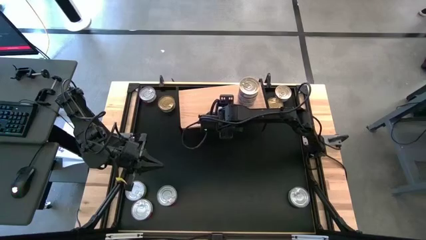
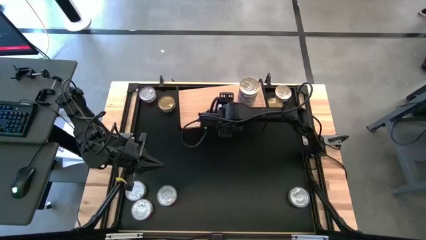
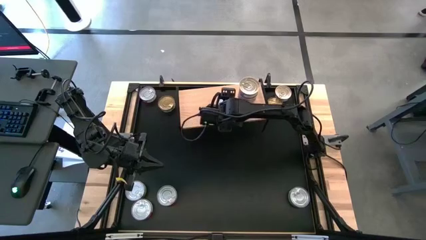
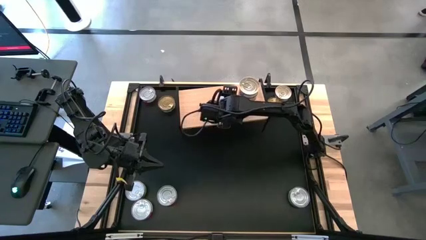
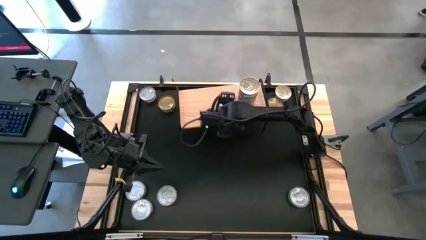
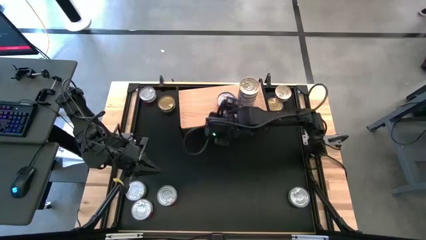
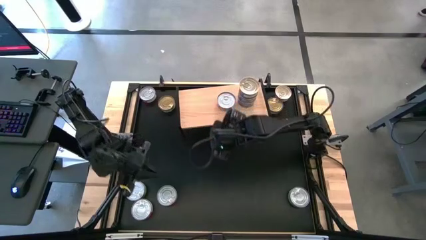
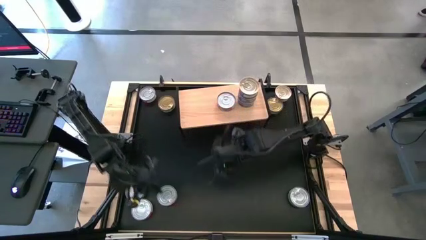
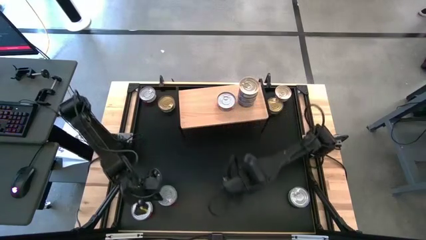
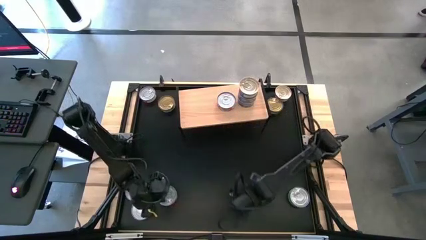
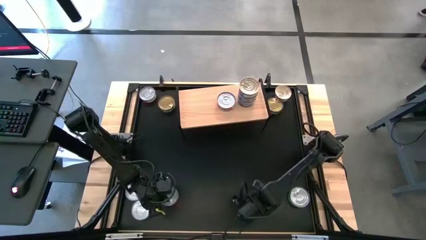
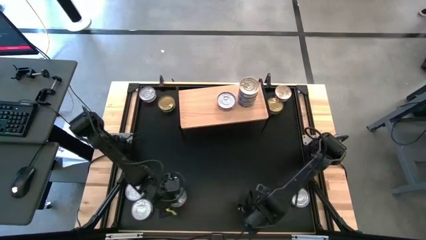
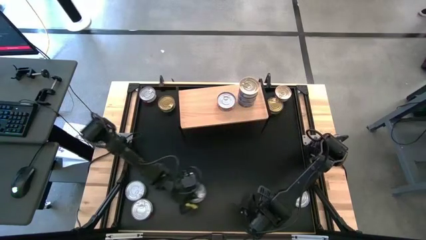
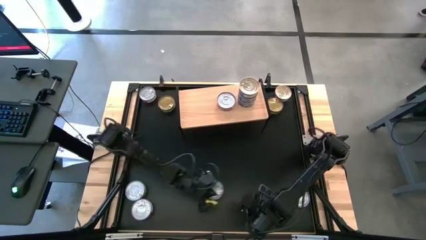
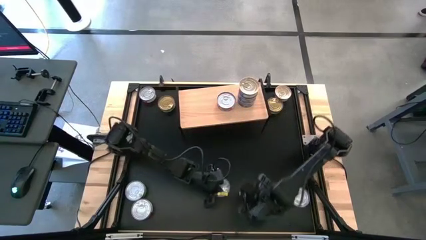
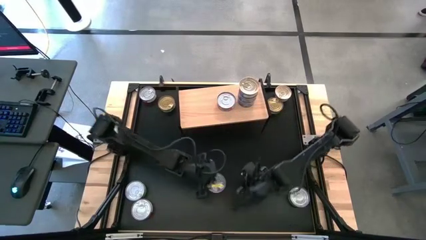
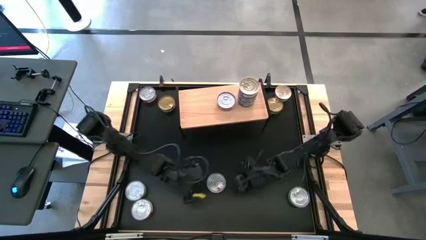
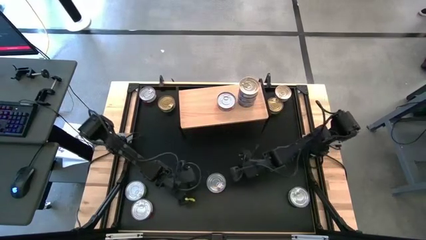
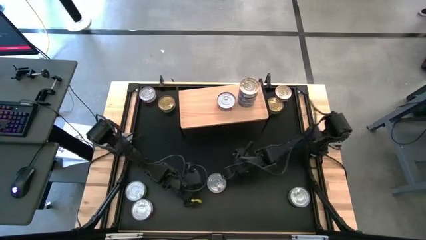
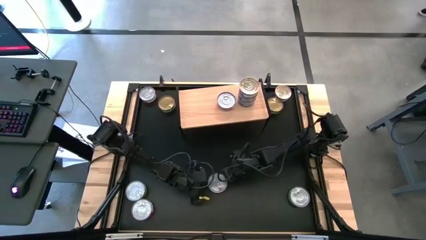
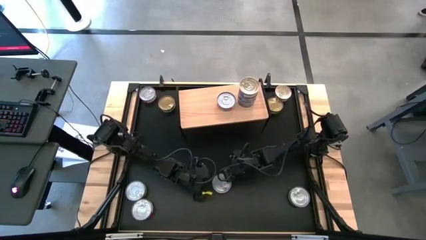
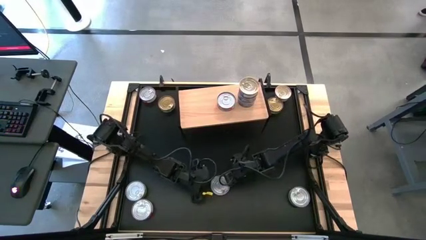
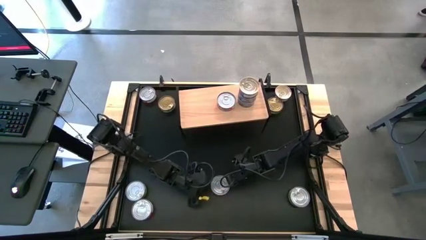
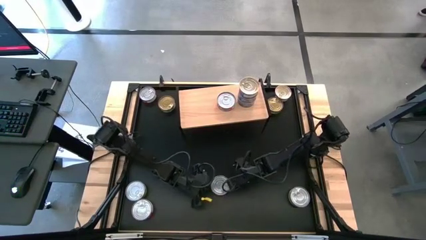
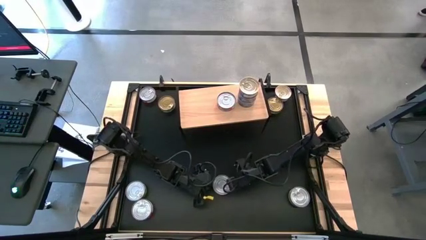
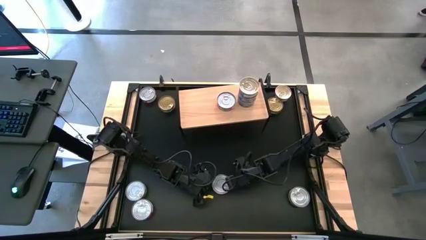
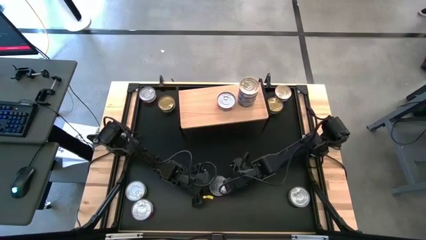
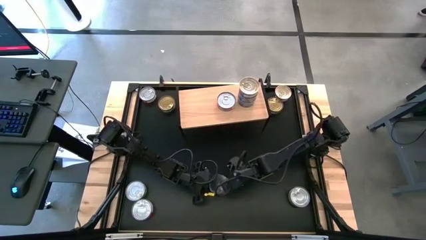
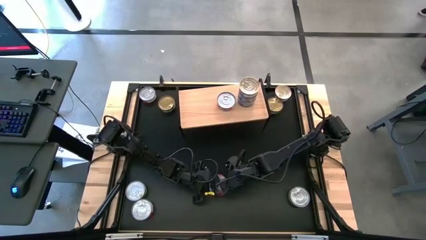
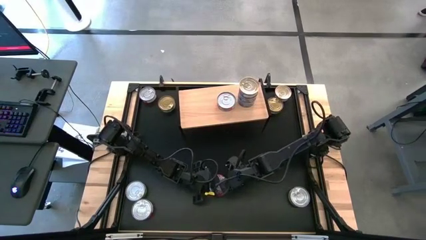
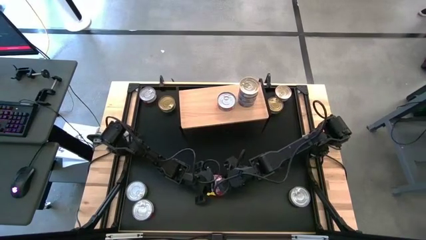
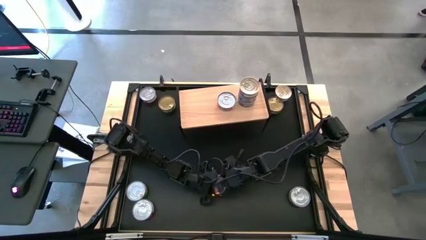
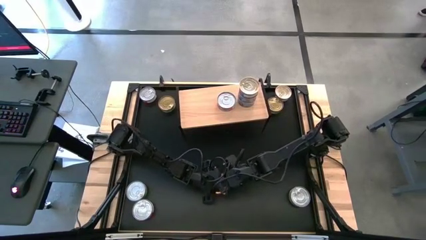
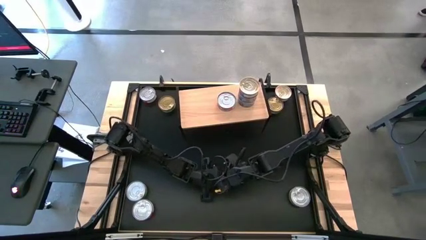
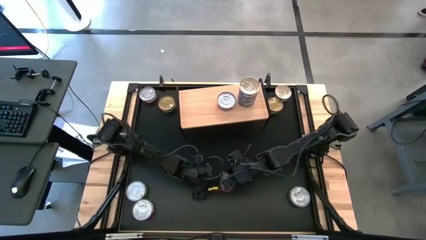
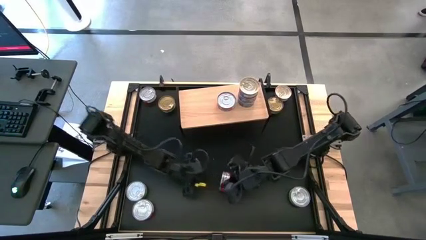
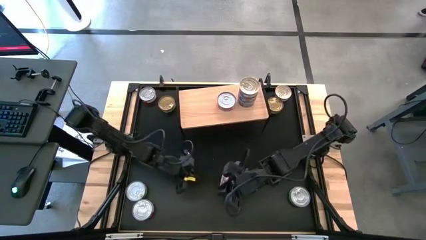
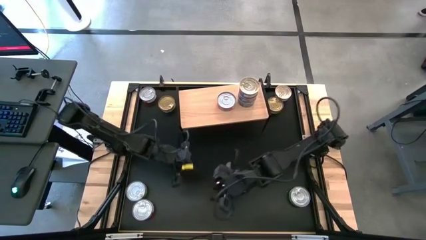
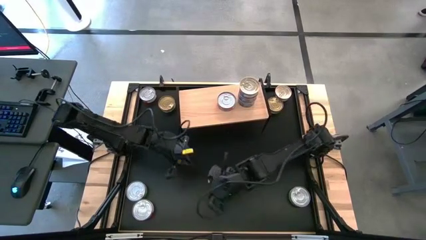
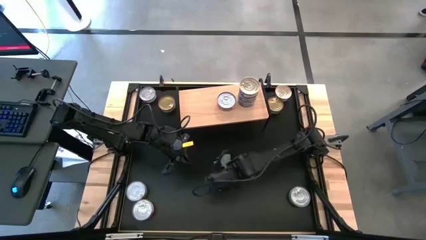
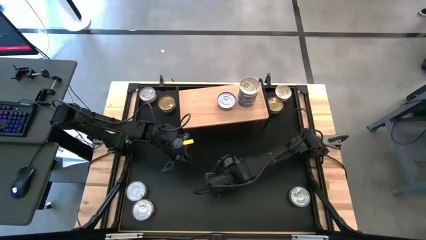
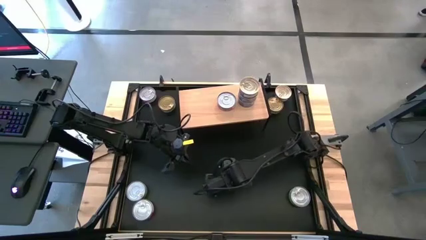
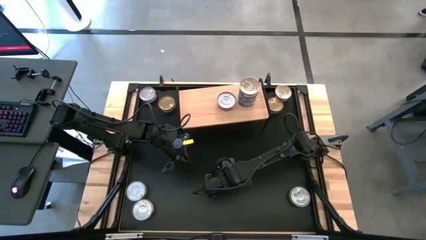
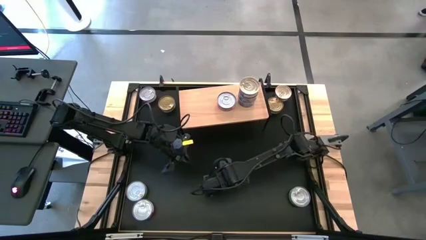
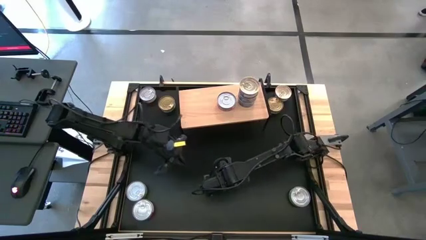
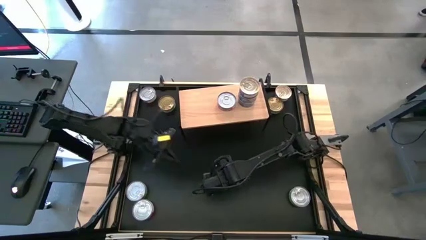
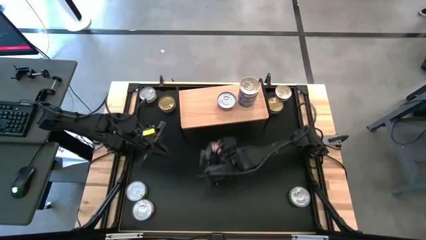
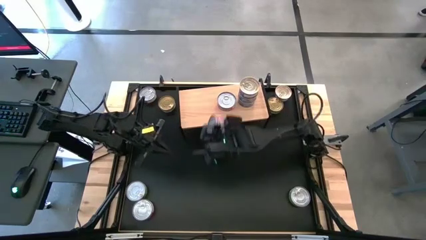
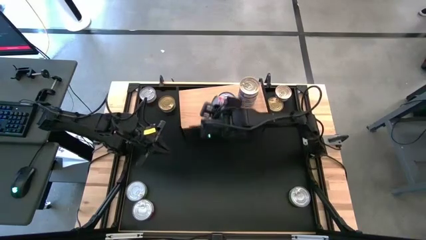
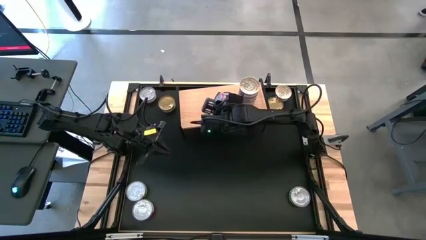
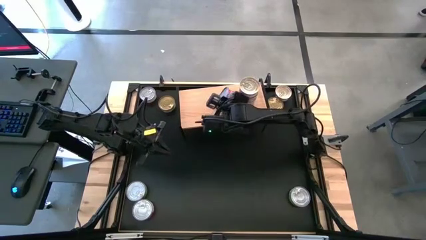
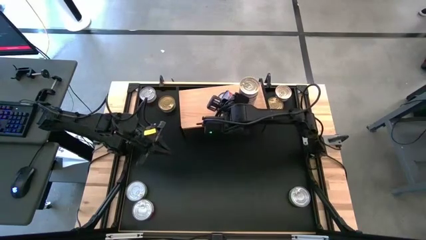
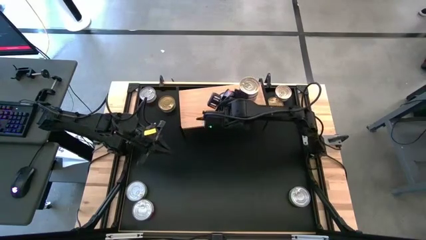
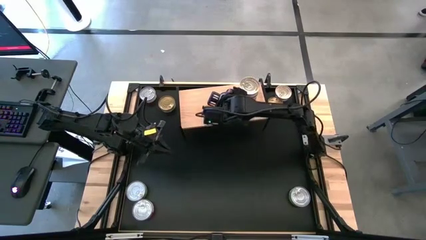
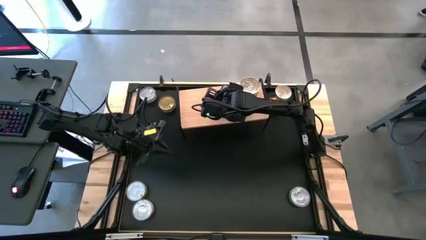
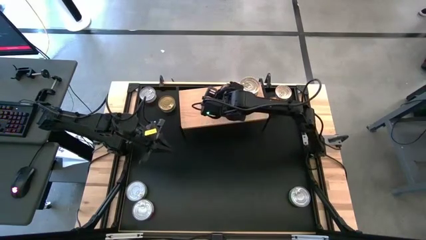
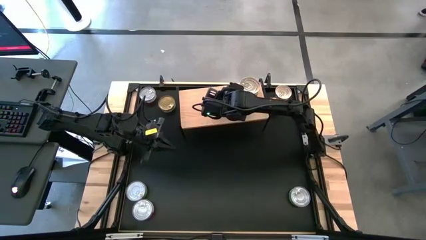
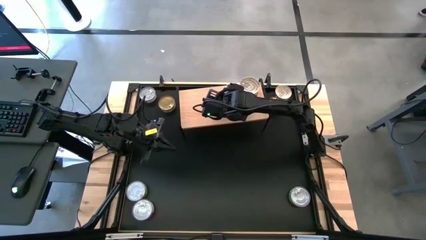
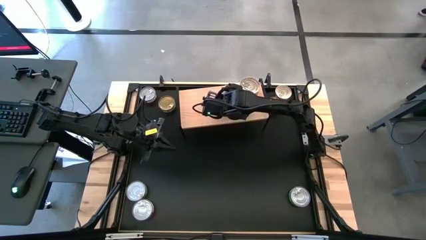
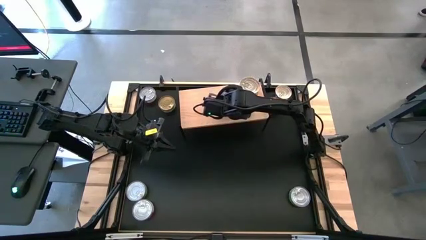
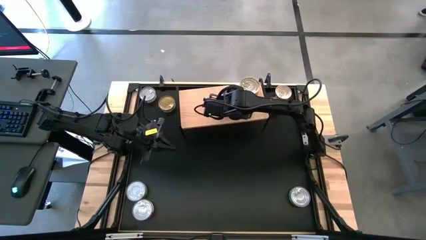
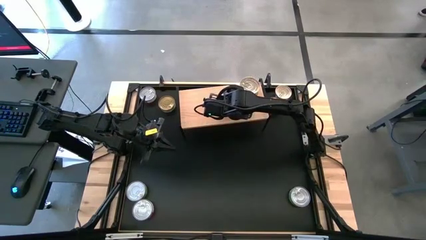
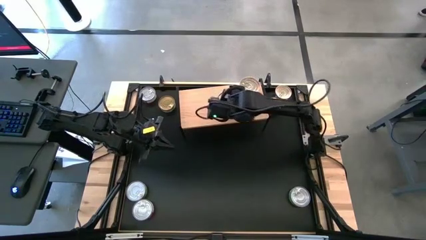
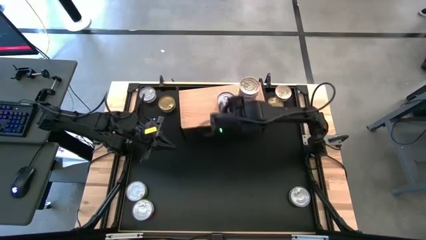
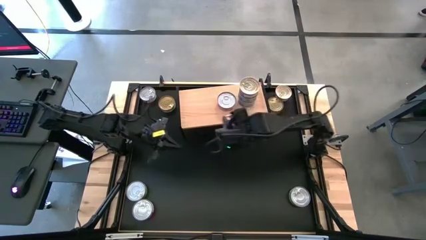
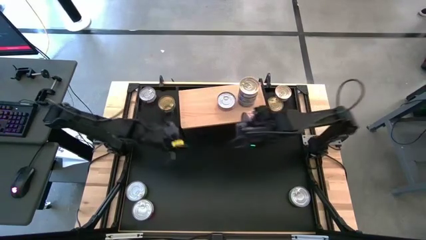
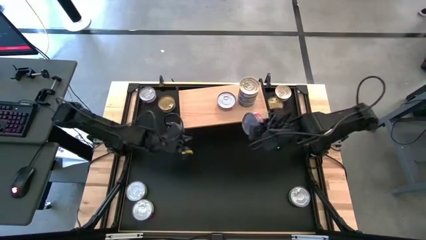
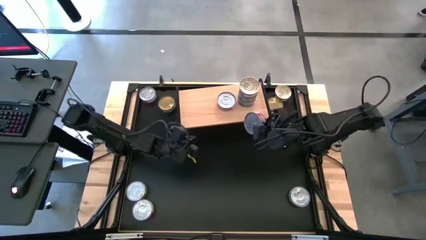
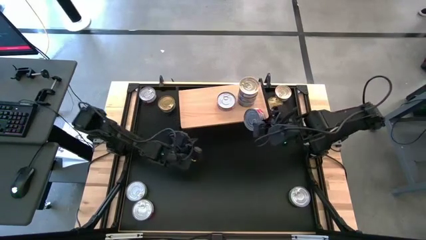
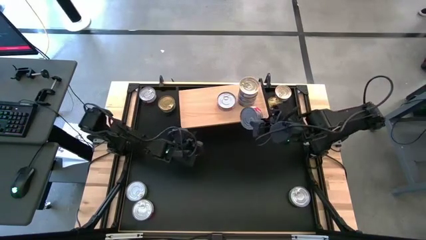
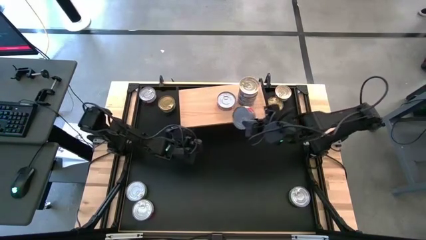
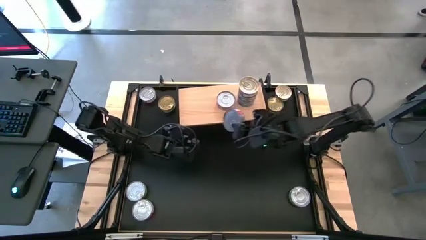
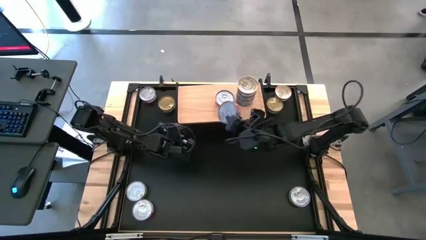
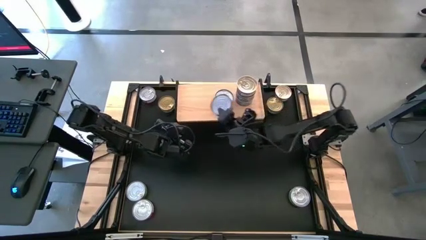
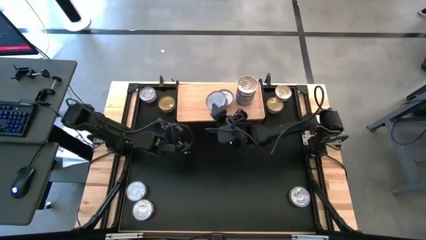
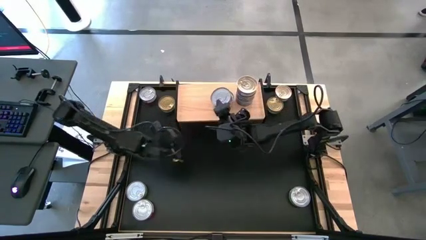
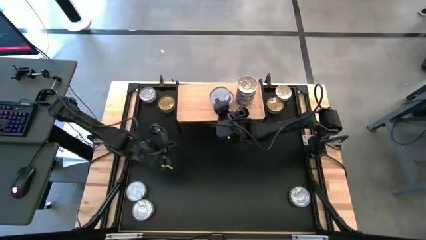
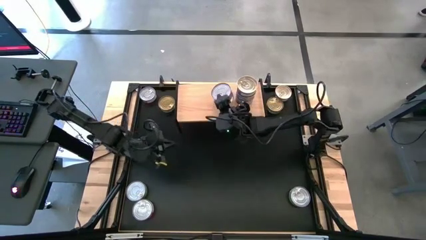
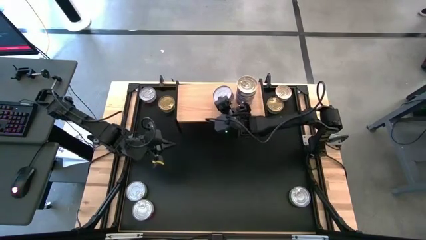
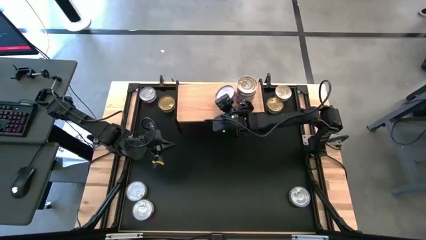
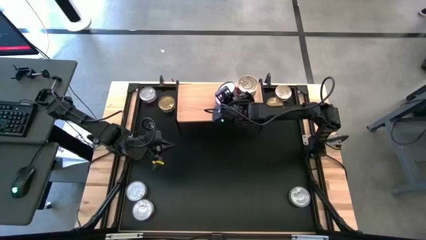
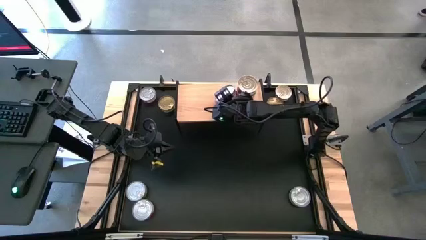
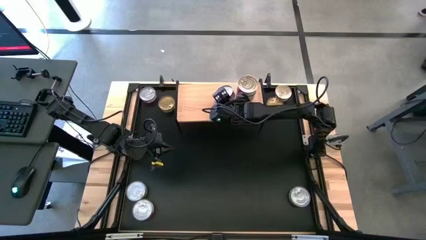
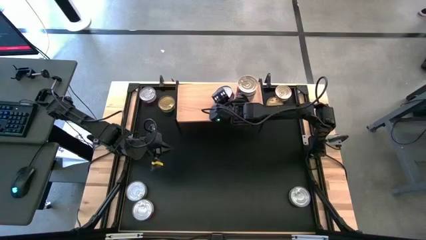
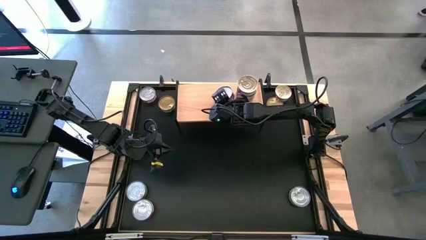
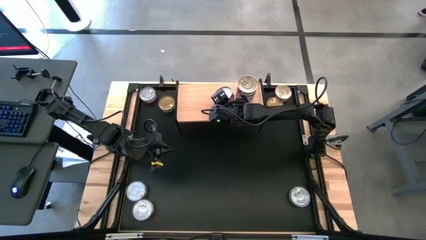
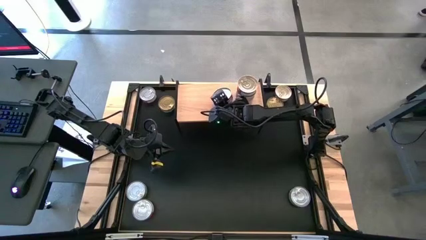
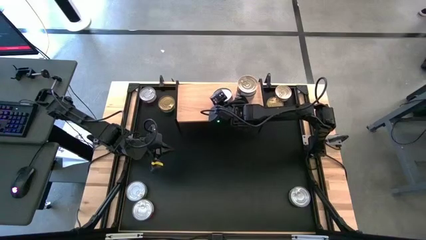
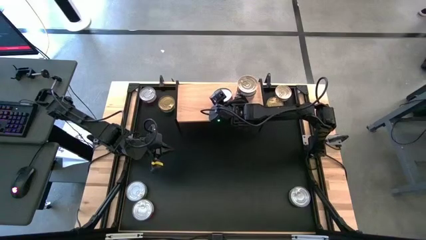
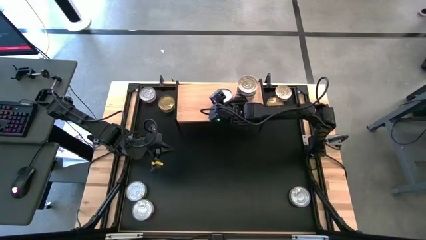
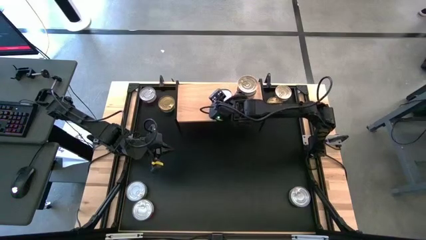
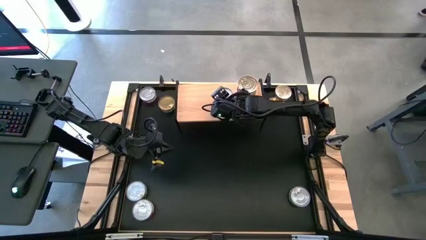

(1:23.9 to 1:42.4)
Task: Stack canned seafood by type on shelf
Stack the red tuna can on top of the red tuna can on the shelf
